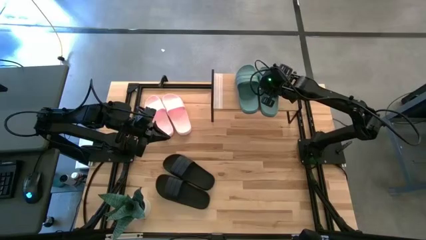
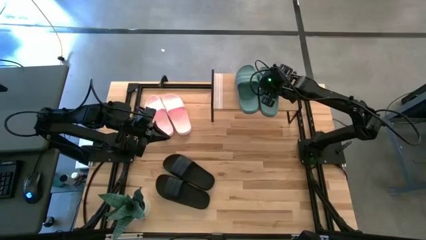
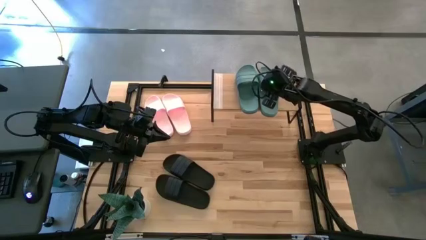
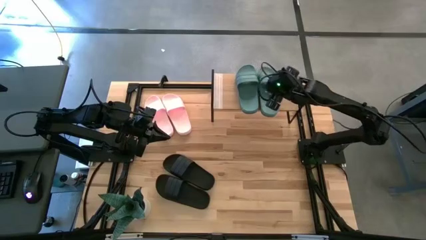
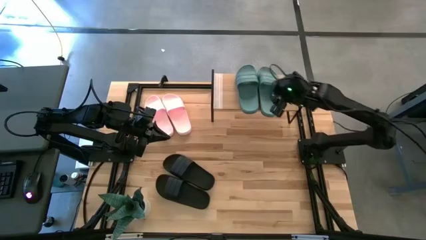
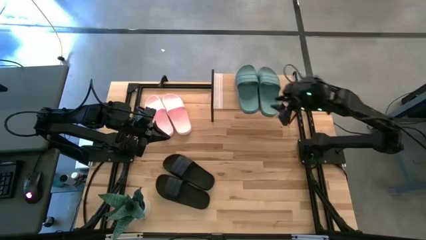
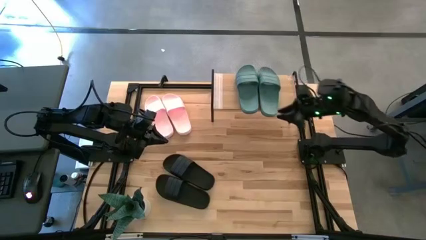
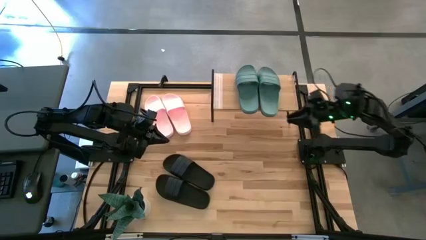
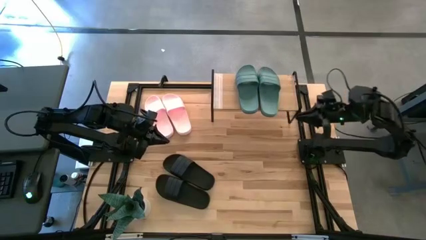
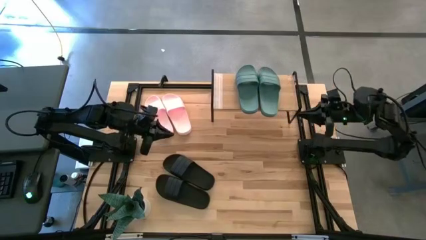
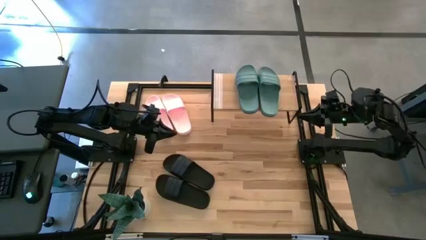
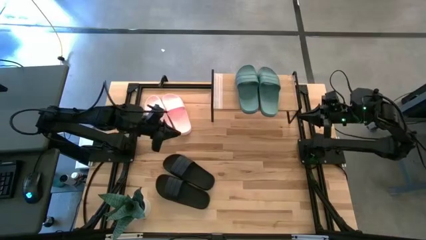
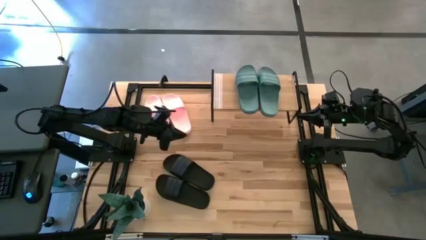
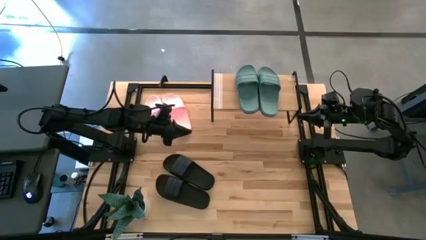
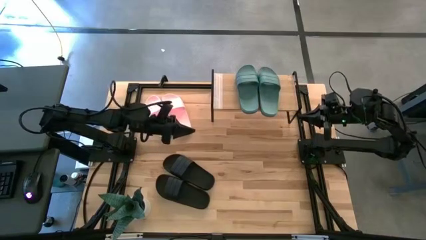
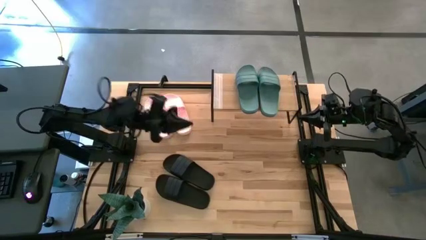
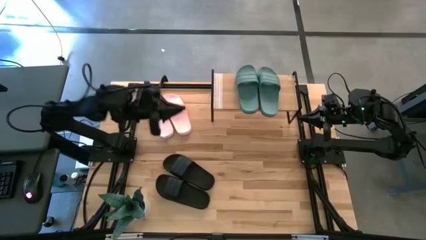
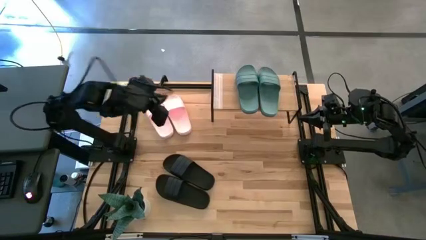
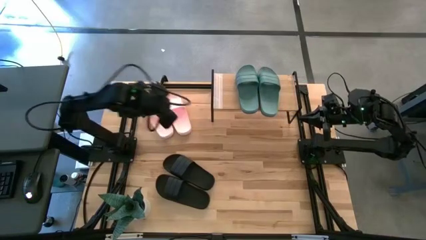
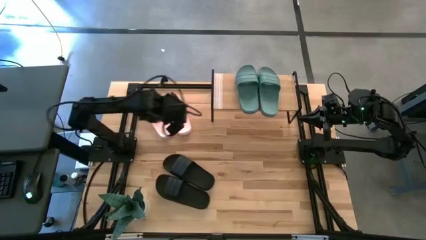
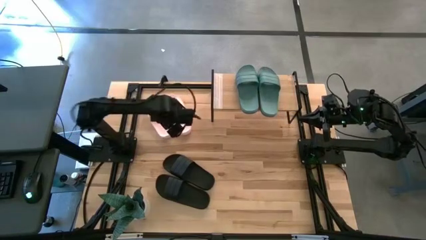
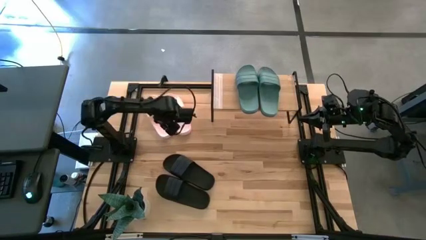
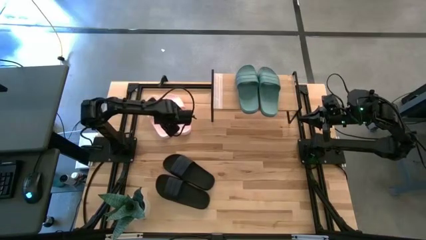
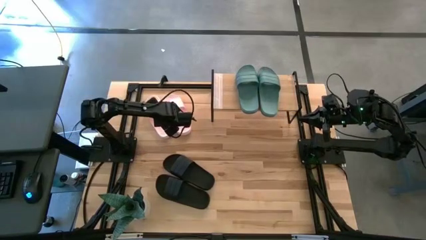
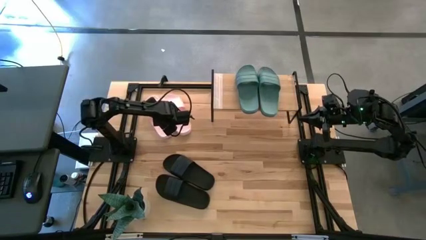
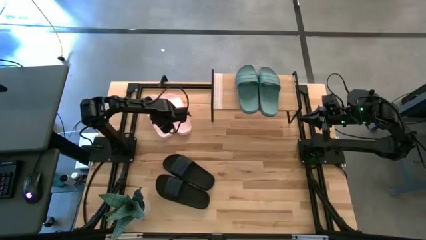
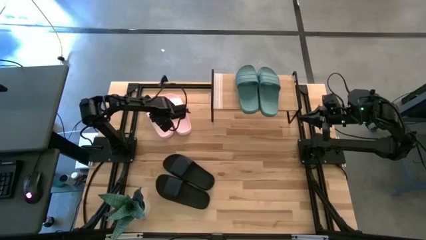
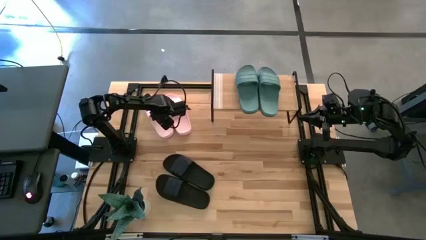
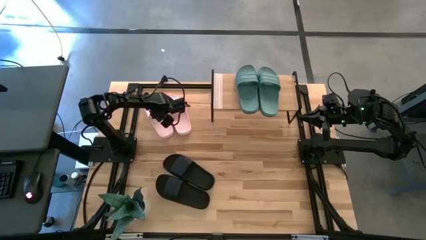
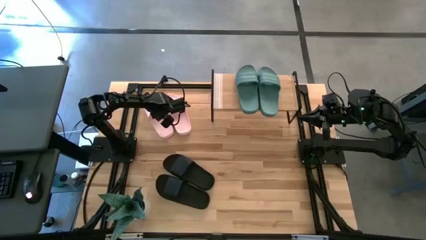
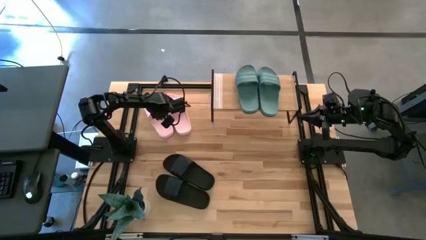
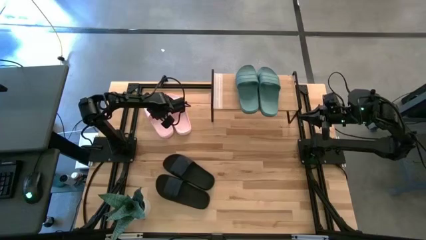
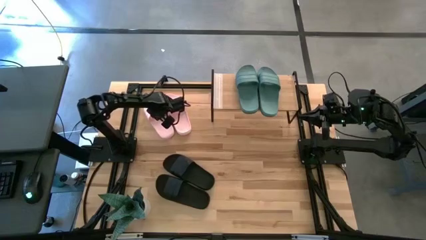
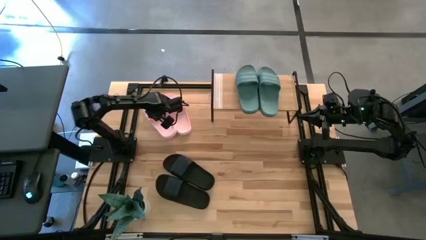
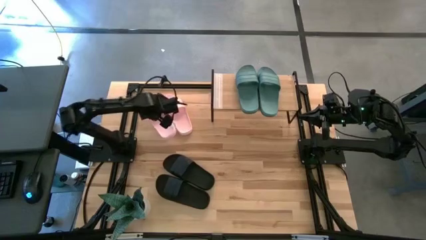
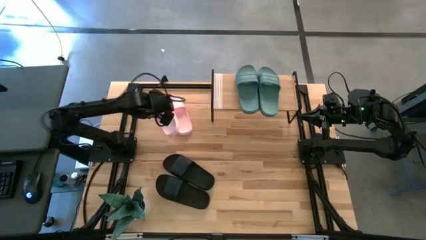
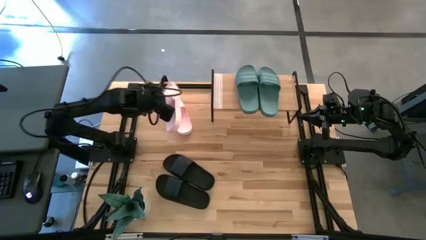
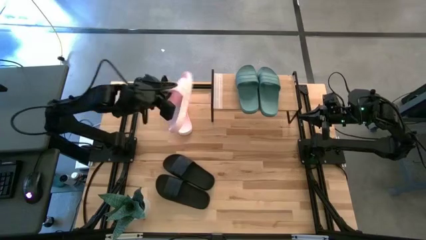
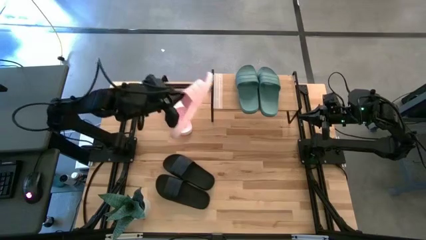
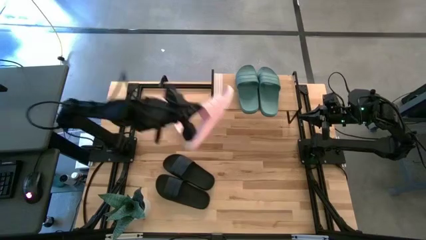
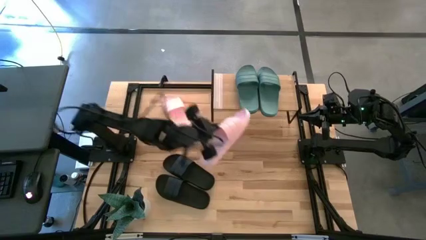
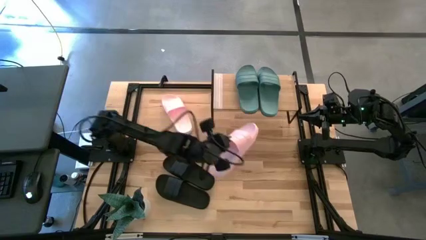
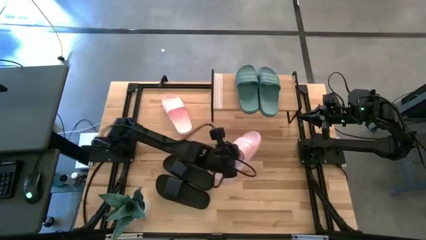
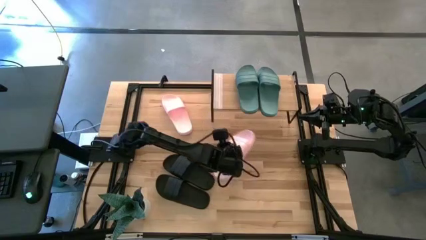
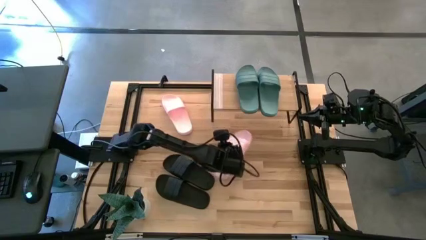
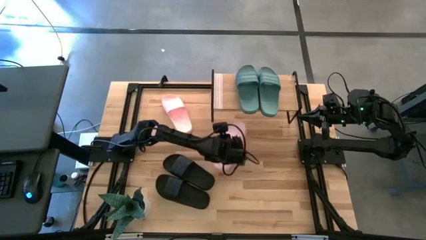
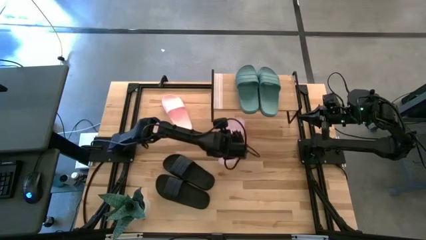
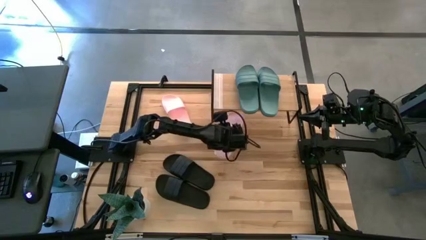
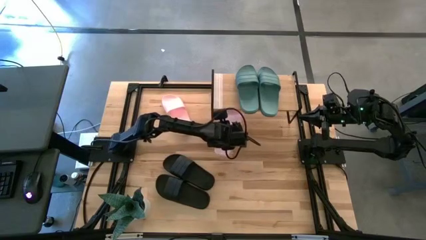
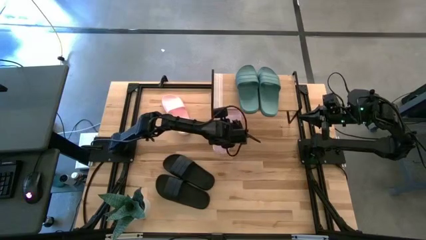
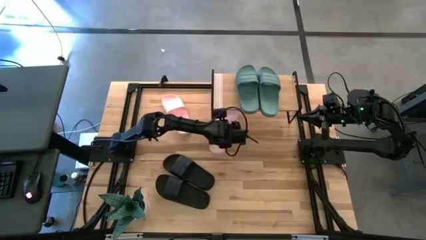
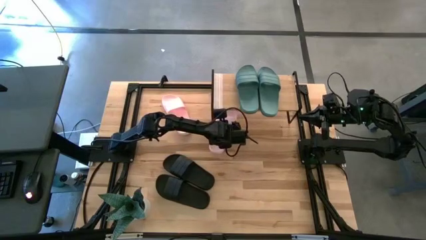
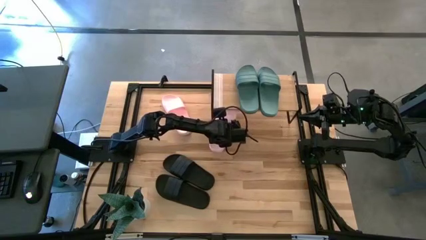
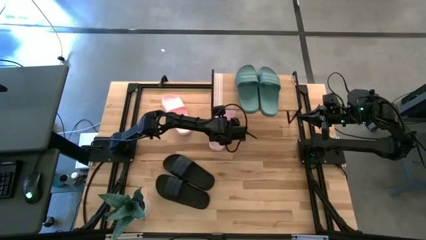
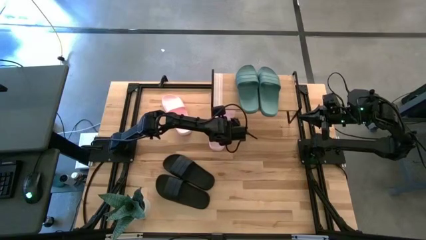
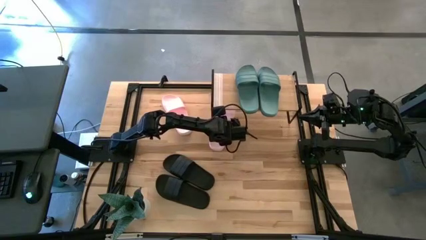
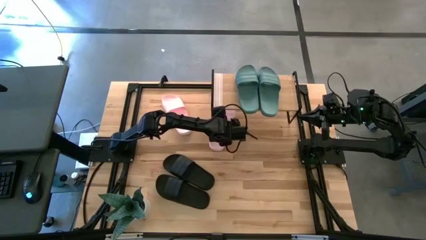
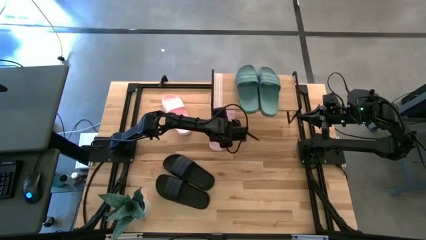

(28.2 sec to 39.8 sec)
Task: Pick and place slides into the shelf
Put the left pink slide under the shelf
